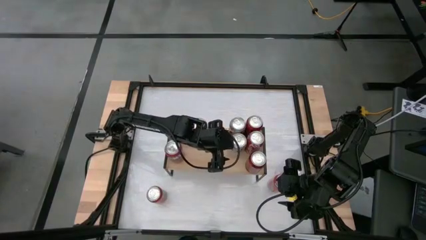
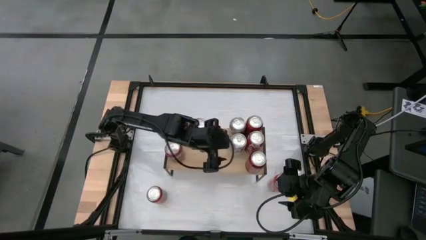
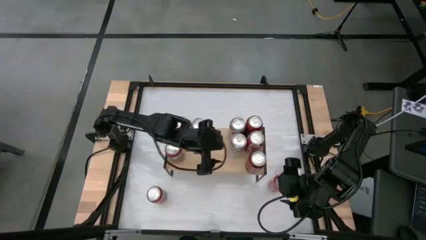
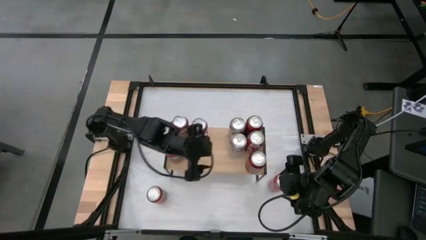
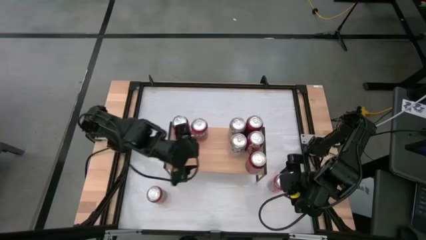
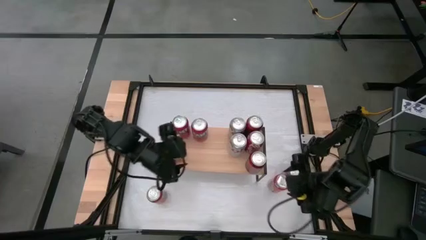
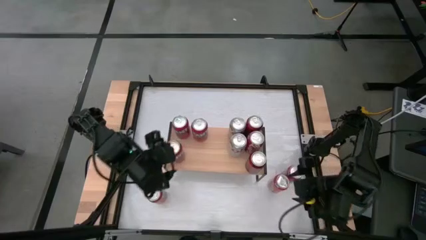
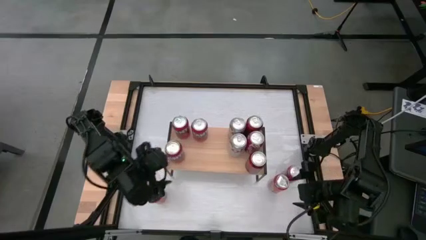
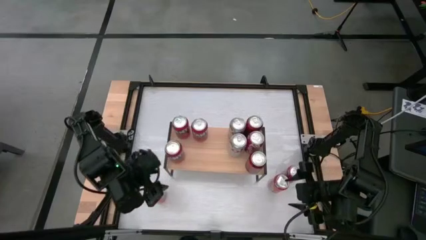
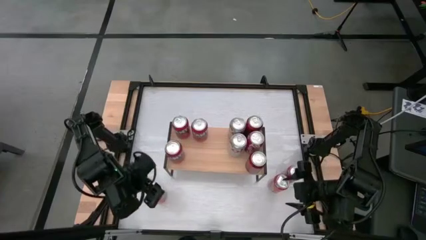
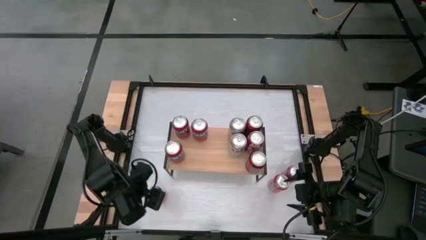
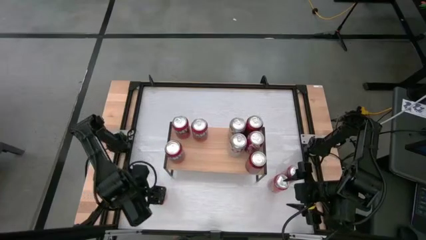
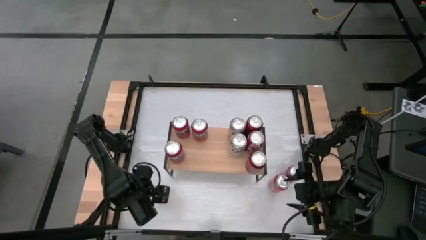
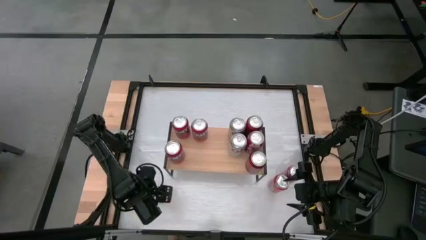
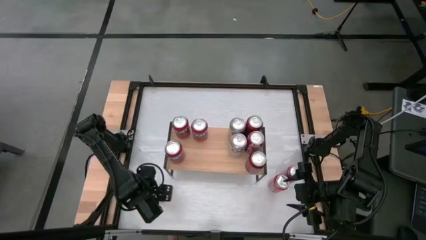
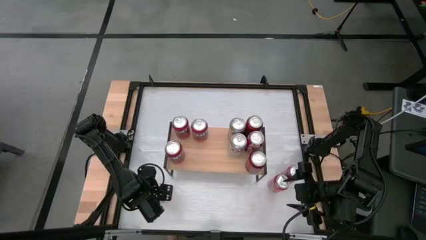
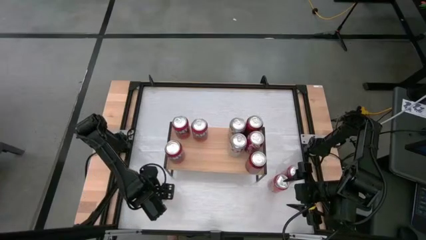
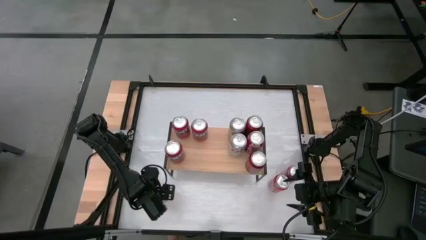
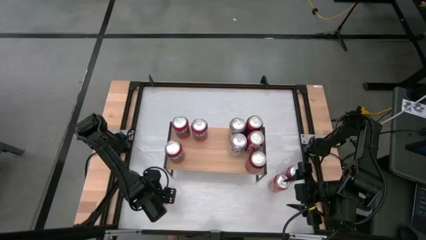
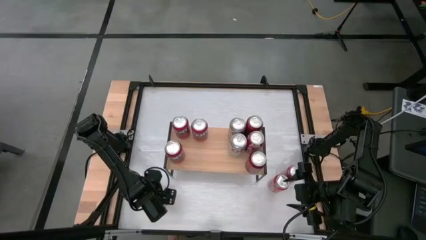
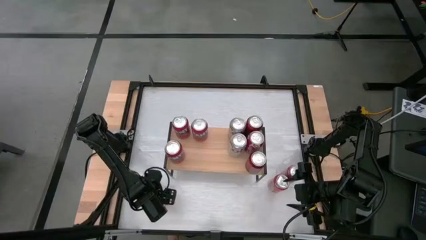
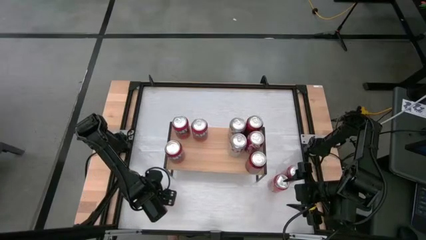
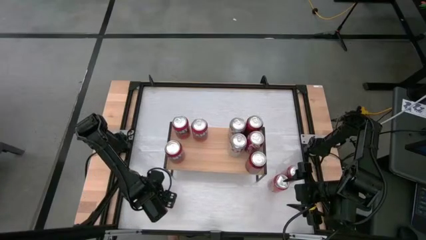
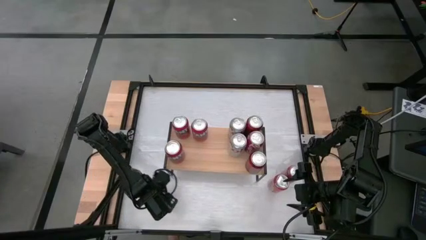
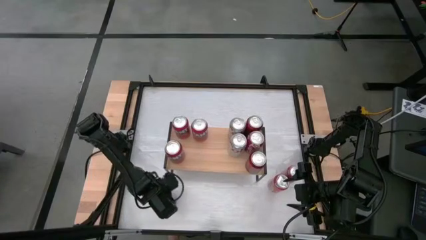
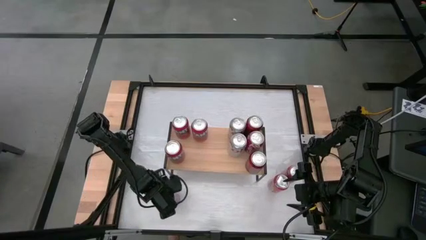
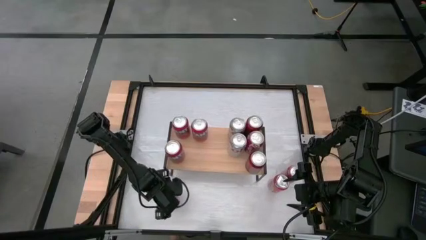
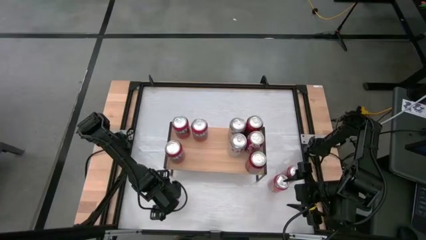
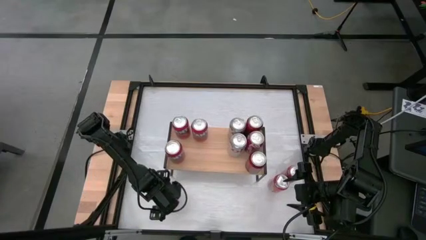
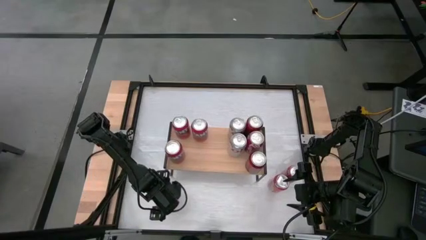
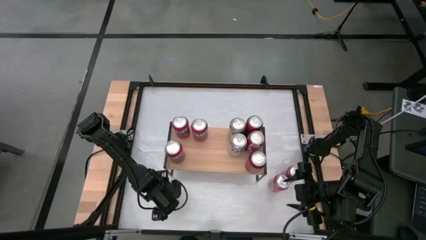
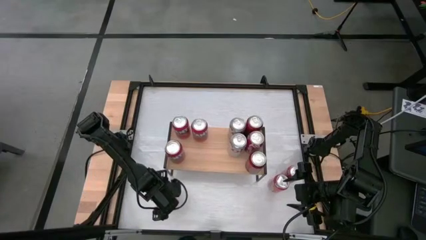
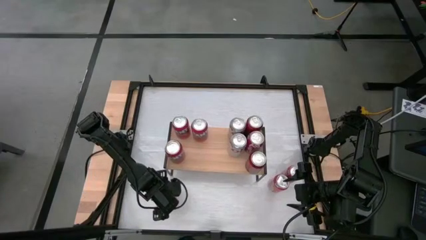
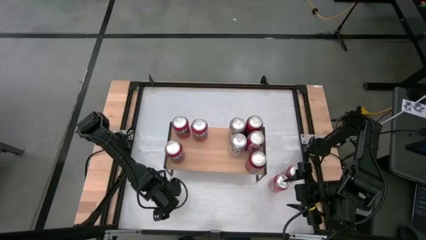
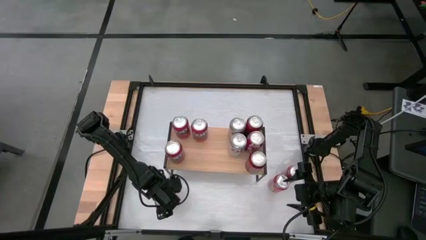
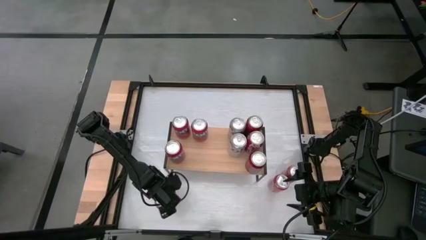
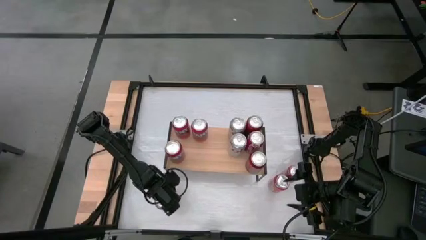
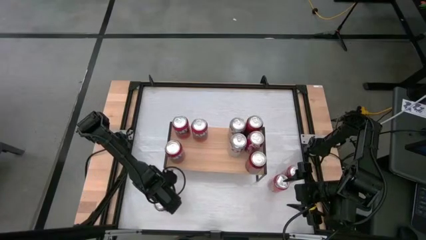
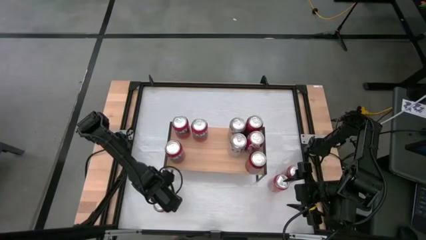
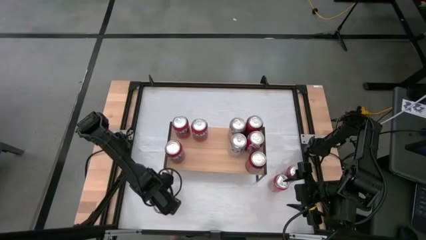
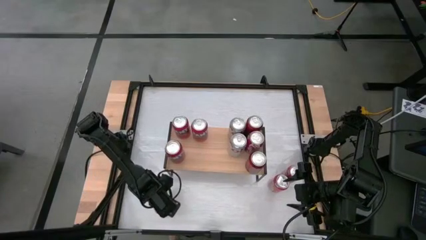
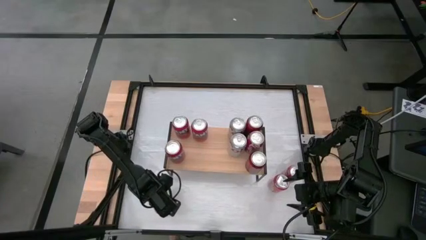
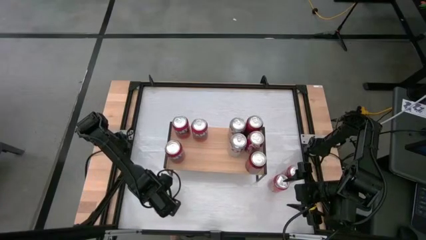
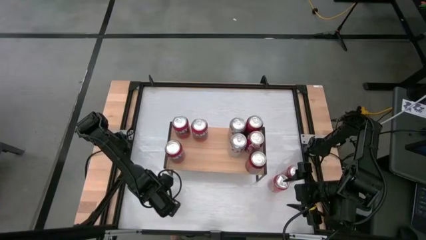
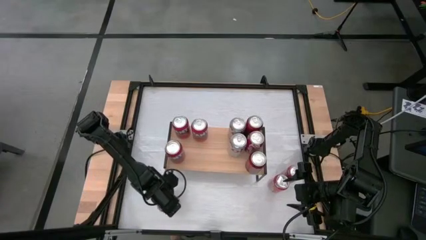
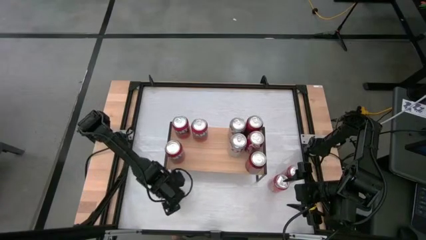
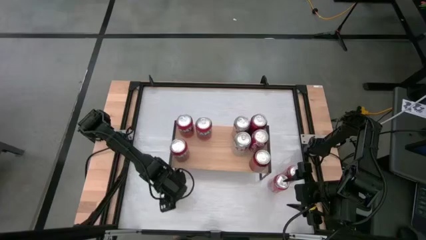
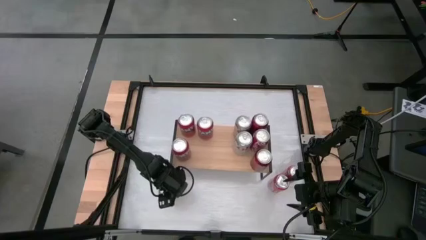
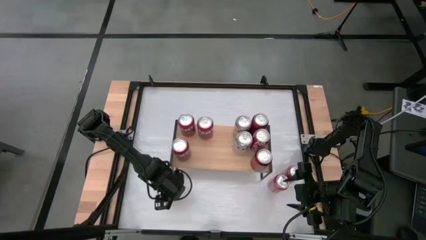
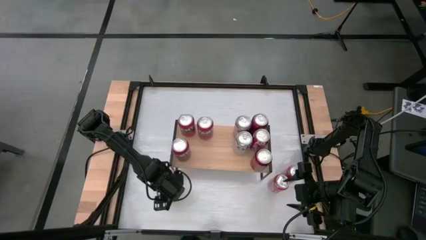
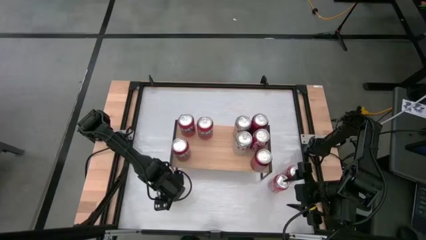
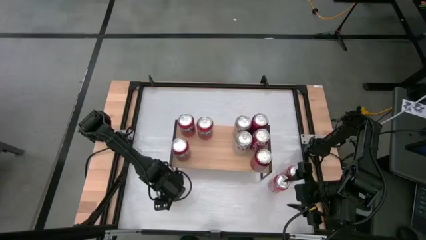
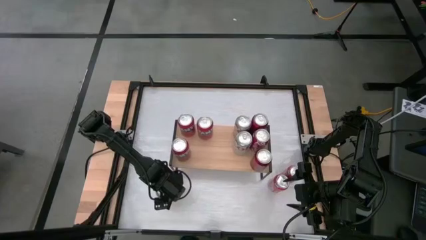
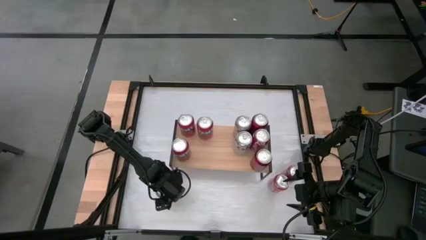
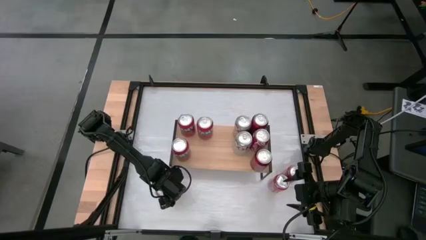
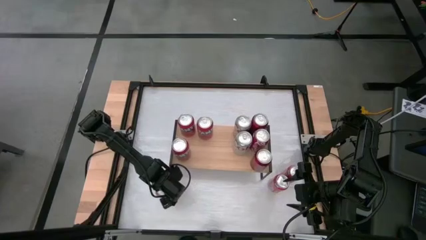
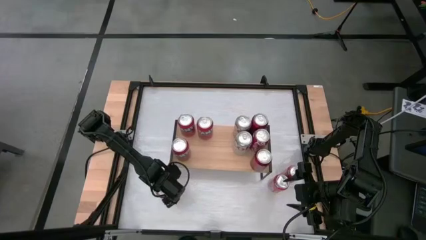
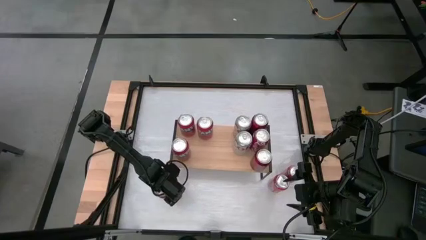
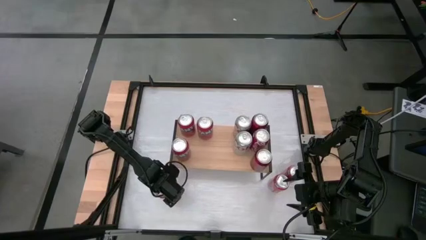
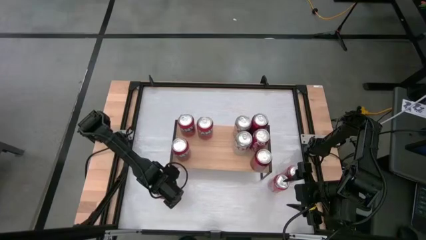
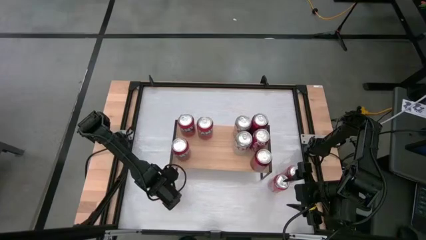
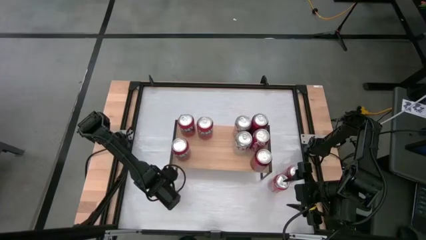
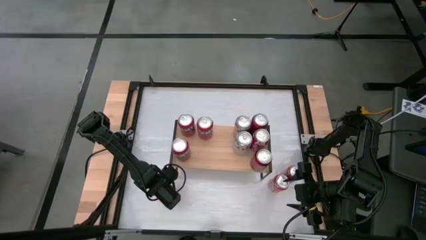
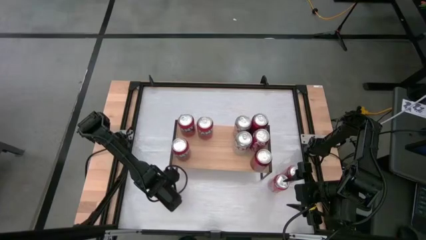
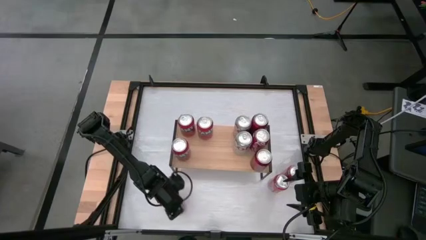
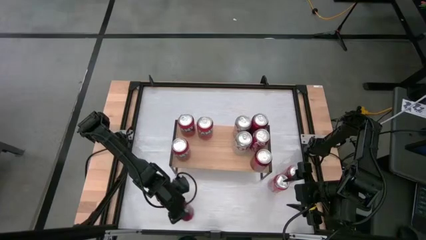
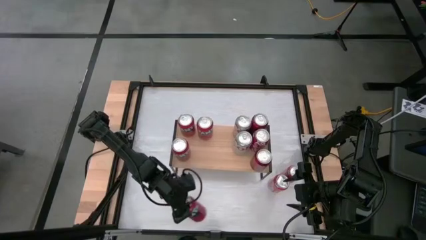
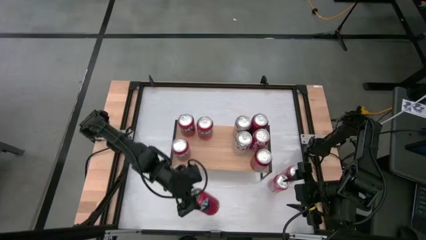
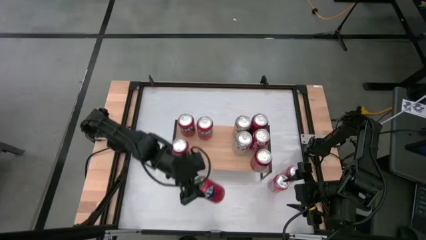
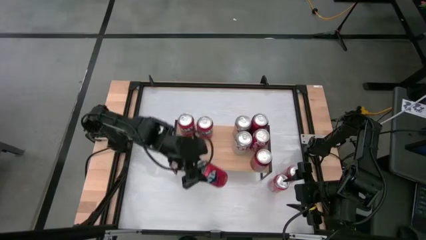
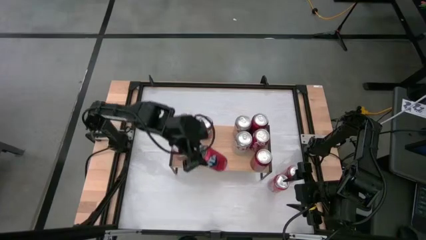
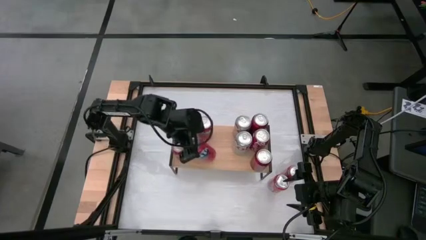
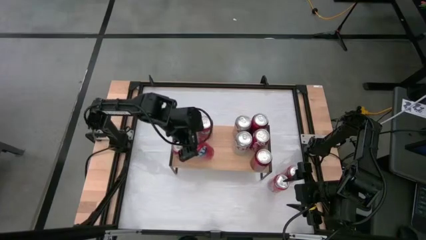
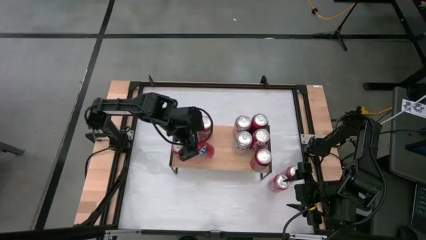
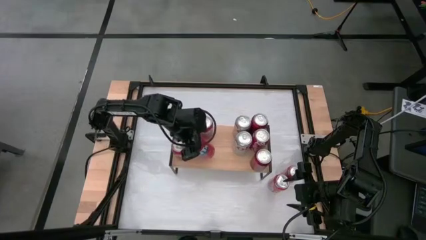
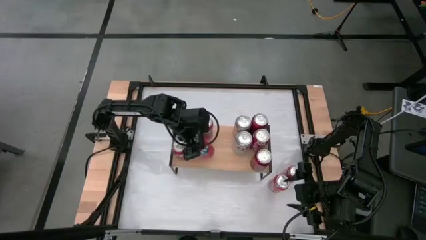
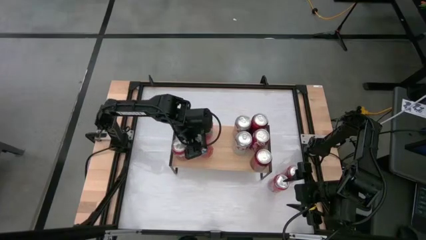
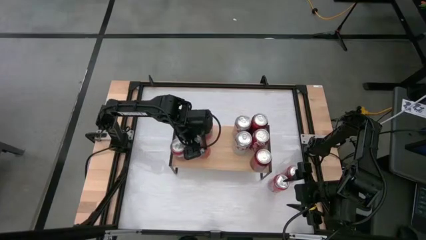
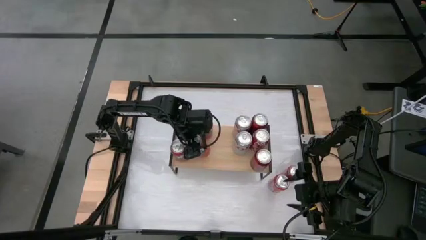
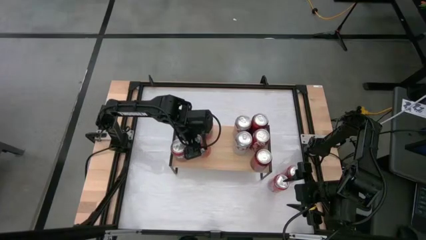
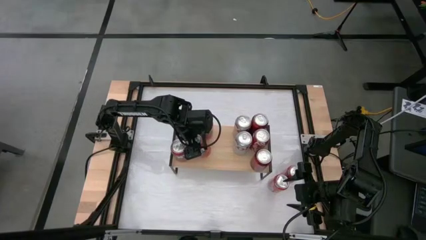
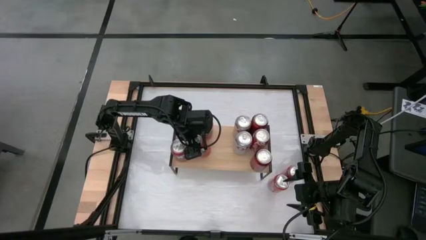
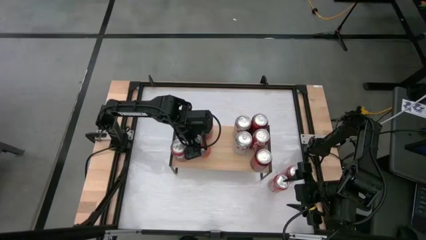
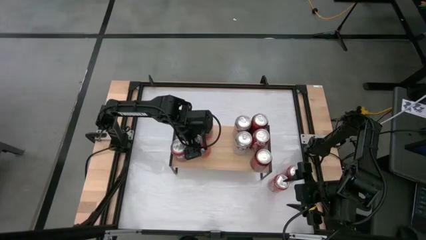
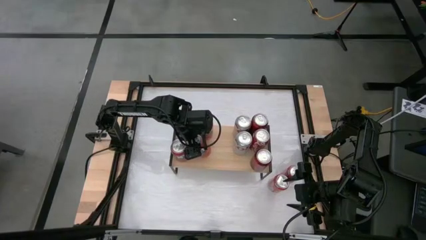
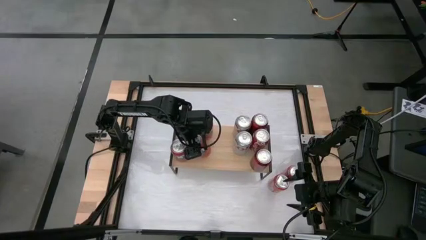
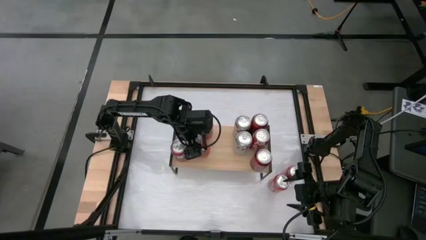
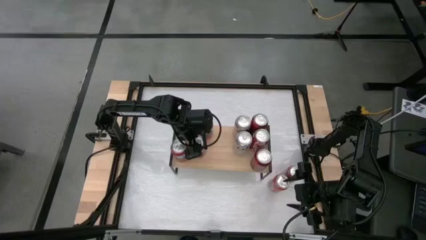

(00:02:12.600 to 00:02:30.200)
Task: Place canned beverage on shelf
Put the red soda can on the shelf
